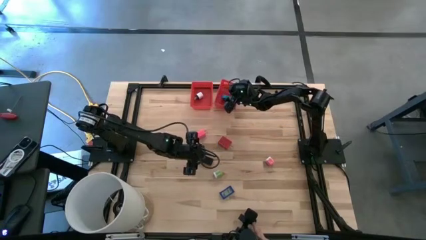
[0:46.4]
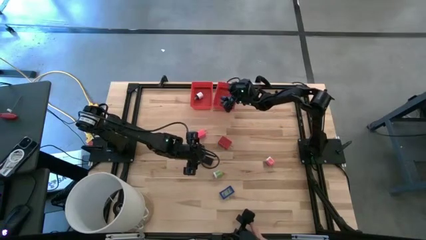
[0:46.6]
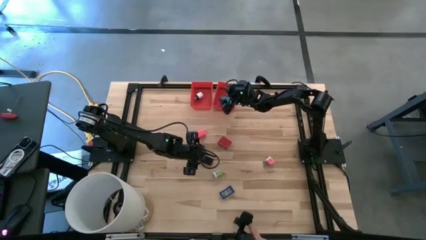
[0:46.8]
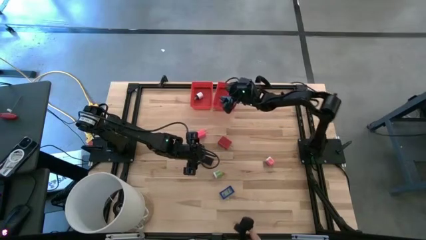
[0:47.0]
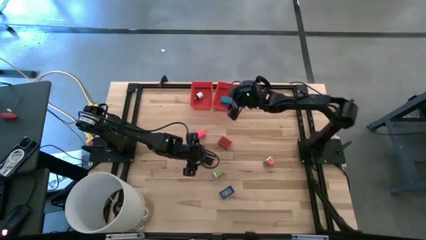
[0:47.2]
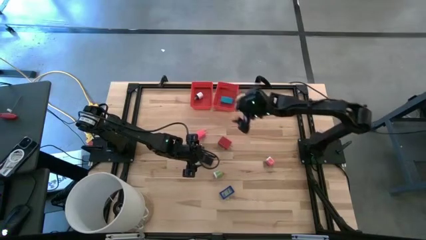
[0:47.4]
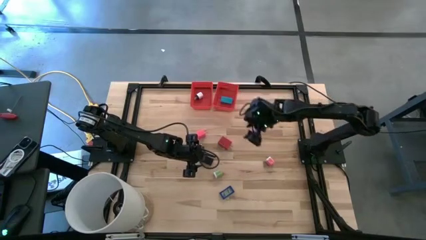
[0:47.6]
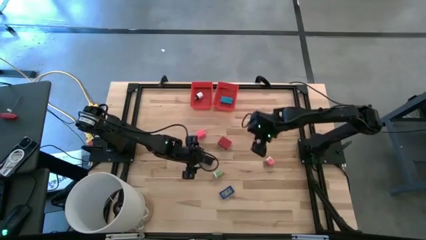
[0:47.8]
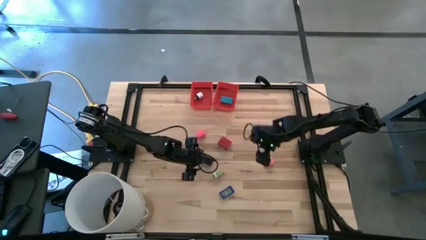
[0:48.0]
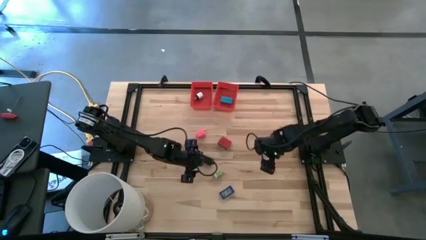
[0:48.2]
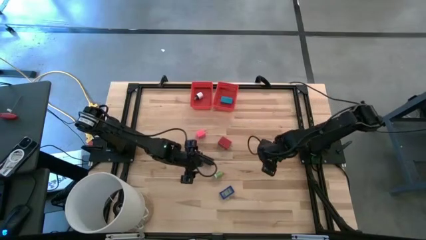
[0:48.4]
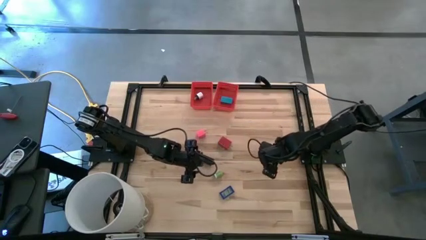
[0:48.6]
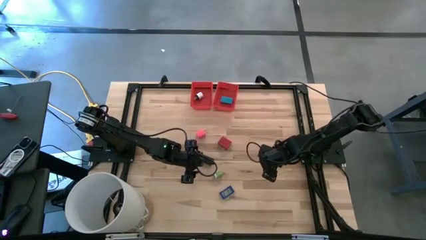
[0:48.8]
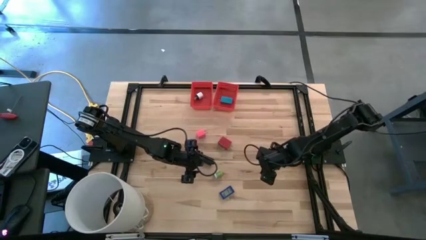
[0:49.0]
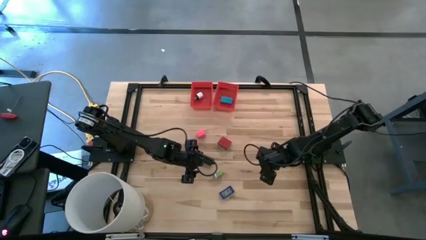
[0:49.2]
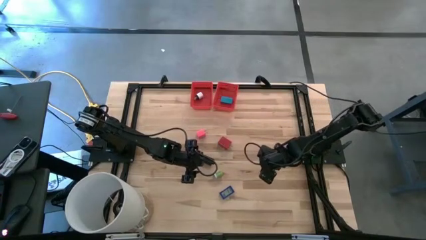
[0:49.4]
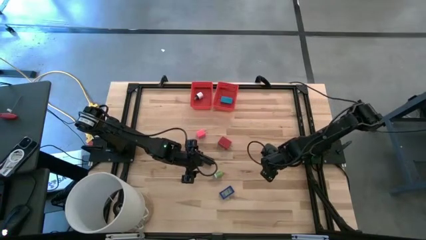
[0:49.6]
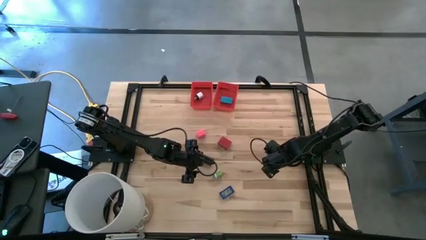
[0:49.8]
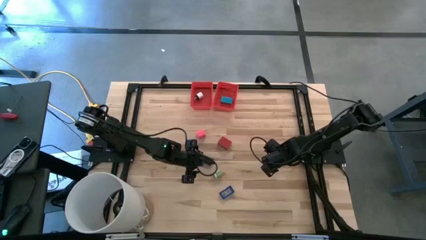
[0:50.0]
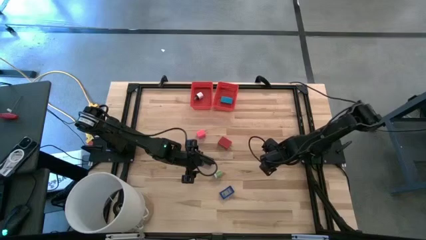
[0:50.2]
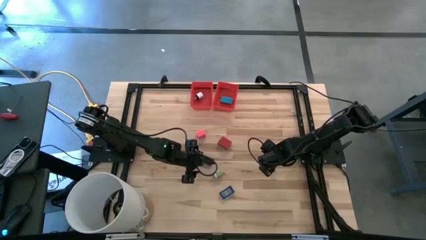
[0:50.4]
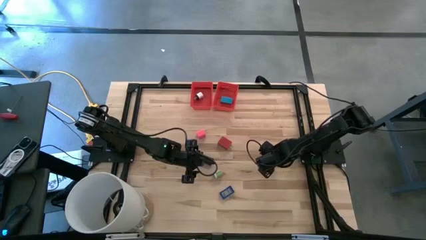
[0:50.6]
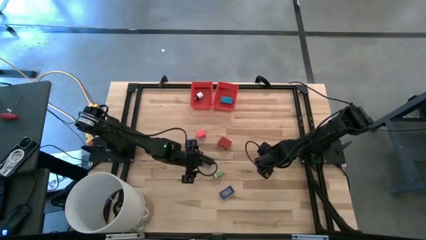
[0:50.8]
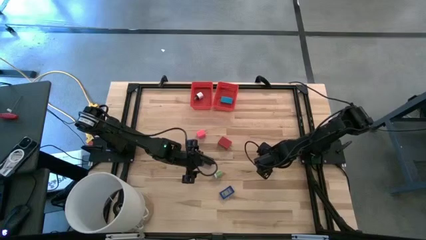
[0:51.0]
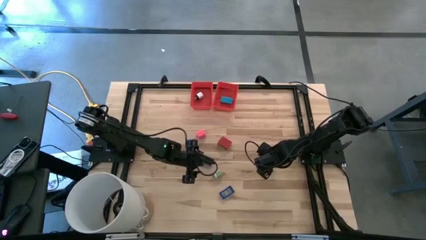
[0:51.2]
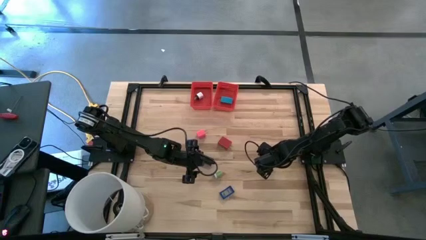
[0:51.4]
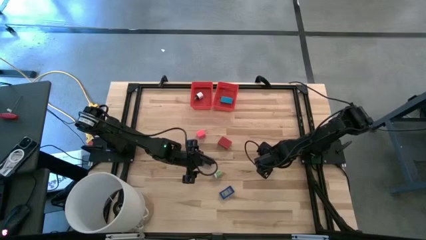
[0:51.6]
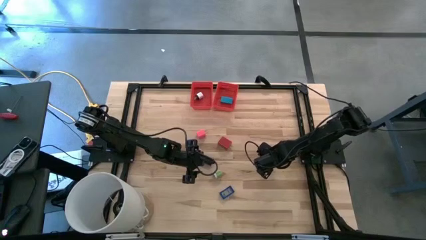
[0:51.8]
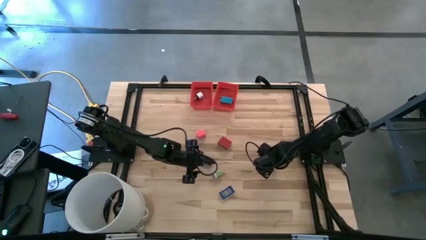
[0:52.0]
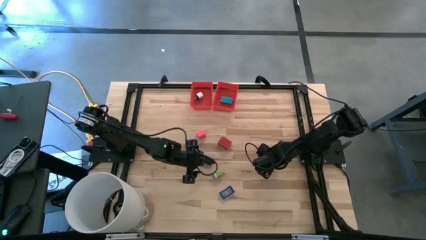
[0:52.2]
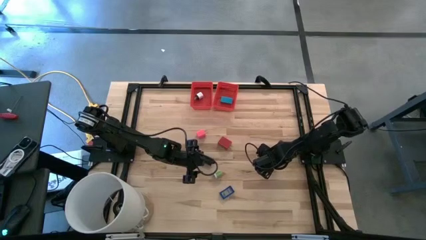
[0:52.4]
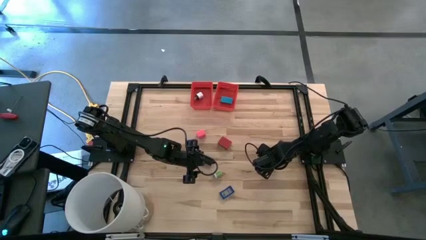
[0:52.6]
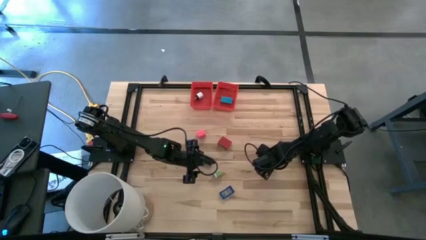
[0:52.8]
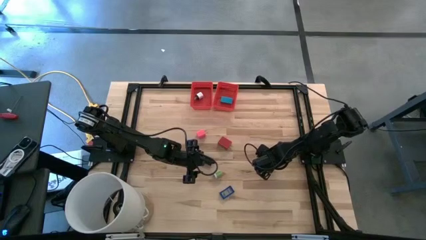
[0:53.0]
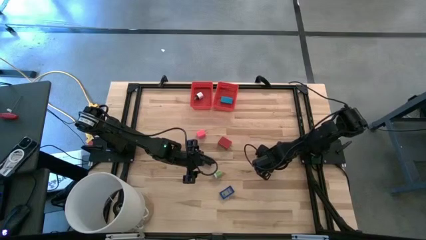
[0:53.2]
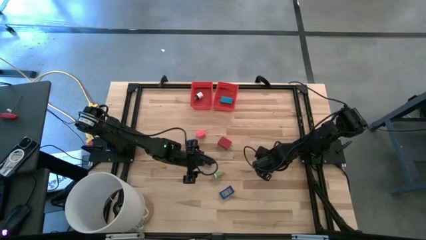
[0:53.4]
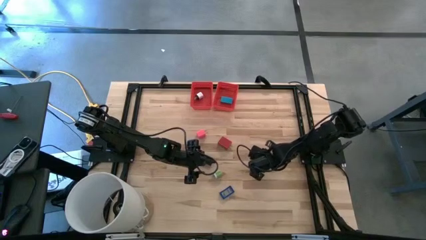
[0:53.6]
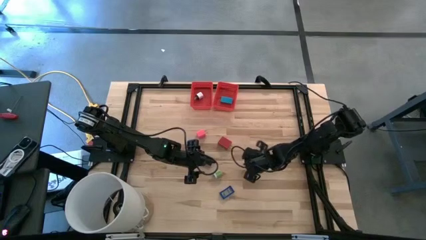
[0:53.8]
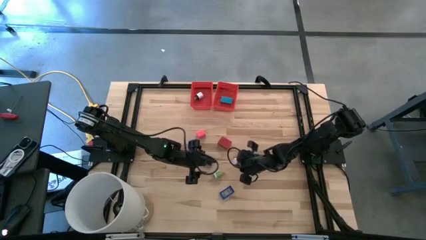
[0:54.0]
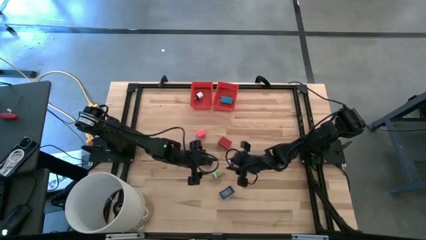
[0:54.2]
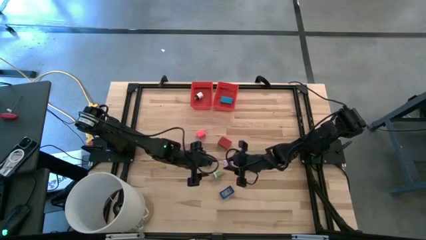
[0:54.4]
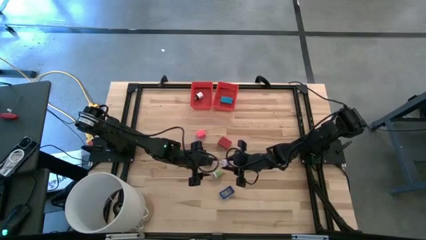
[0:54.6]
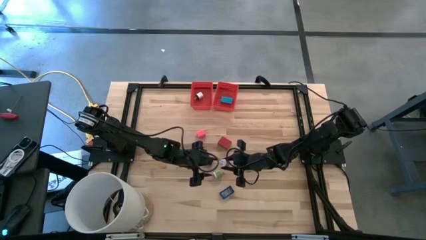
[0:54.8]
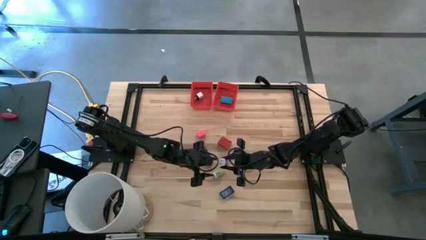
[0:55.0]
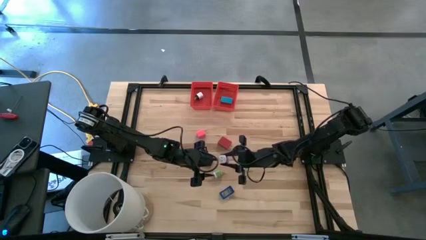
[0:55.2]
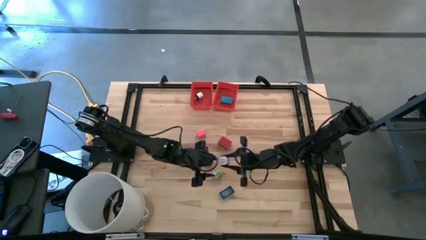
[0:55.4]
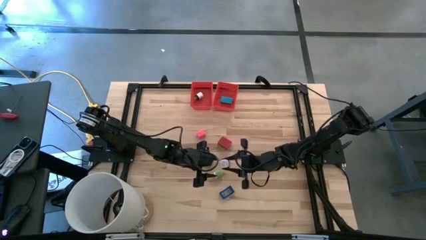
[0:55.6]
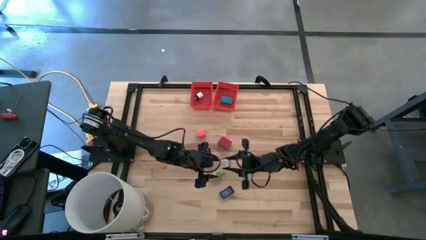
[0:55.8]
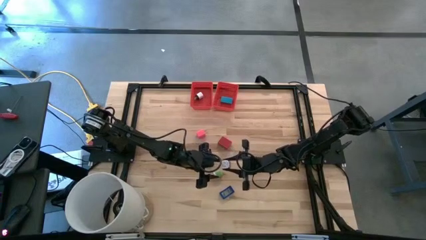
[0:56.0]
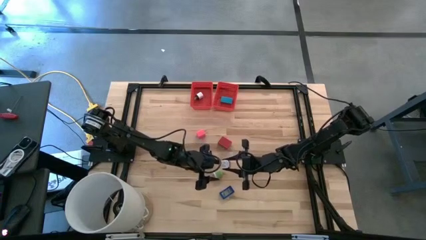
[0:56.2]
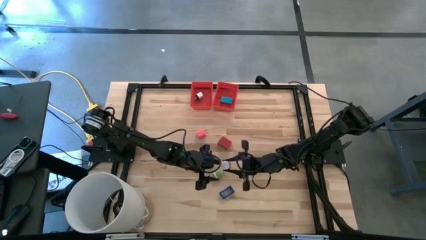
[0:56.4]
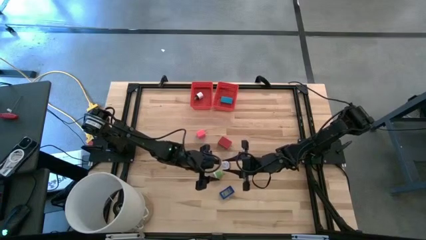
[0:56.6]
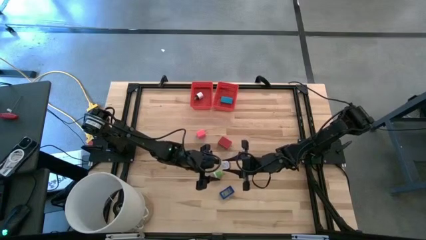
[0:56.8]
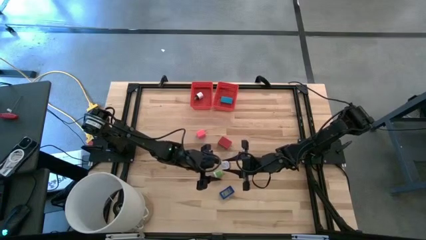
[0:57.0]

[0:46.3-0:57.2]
Task: Pick & Place Office items
Put the right pink charger adapter into the left red basket

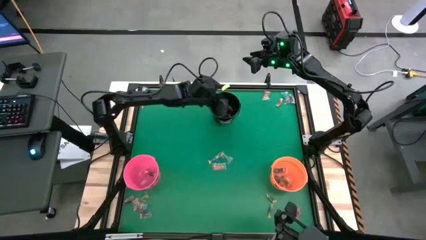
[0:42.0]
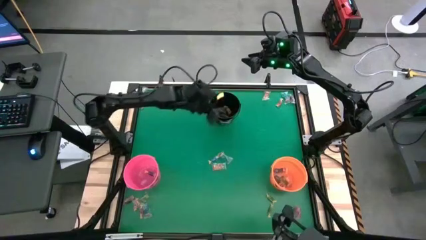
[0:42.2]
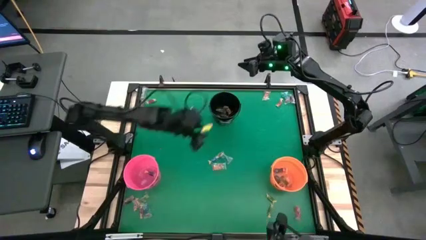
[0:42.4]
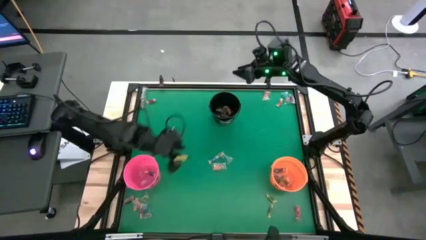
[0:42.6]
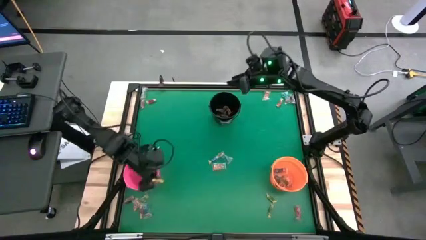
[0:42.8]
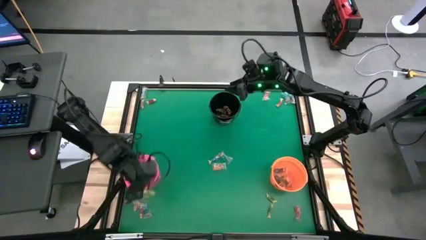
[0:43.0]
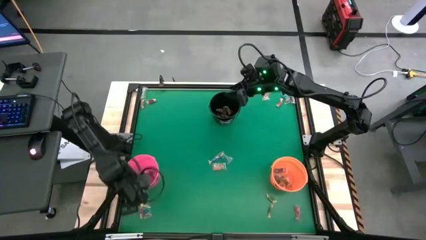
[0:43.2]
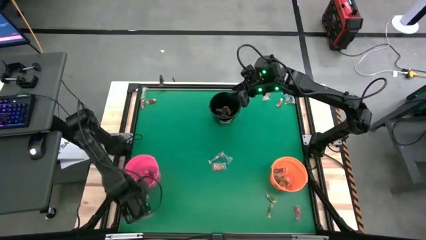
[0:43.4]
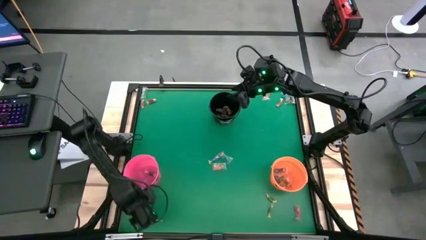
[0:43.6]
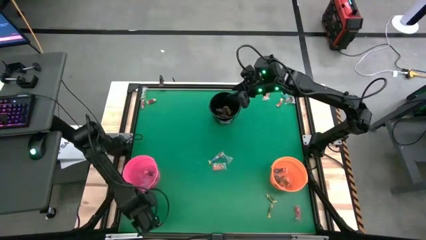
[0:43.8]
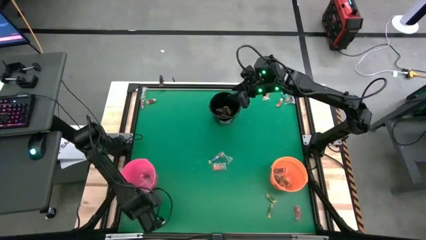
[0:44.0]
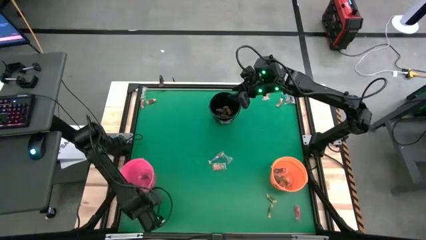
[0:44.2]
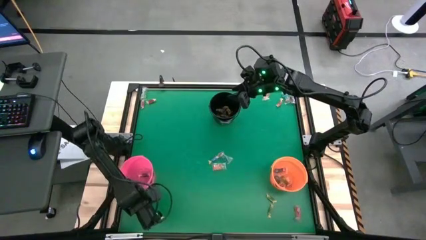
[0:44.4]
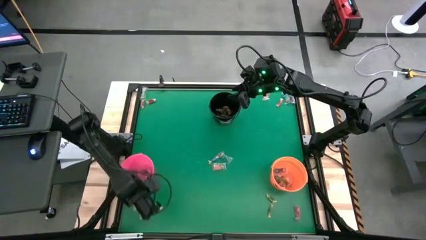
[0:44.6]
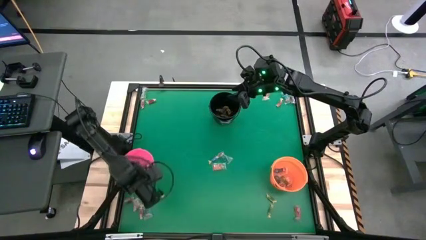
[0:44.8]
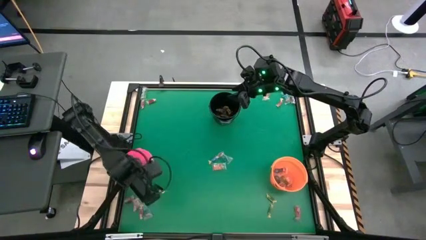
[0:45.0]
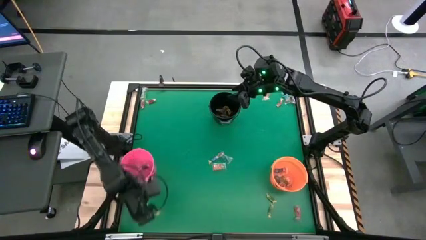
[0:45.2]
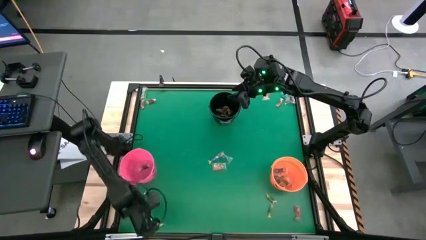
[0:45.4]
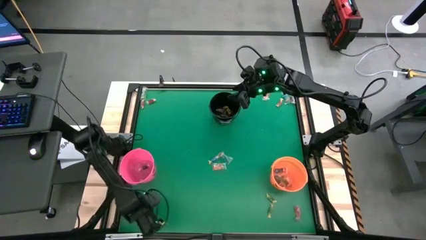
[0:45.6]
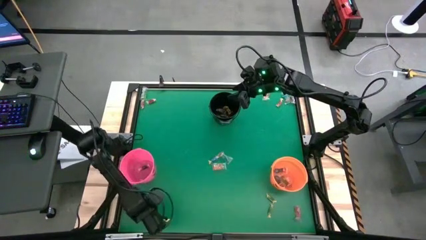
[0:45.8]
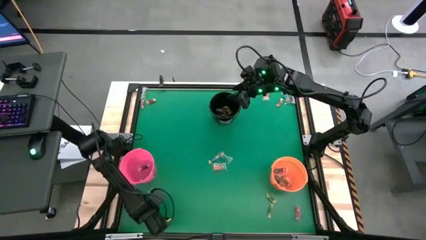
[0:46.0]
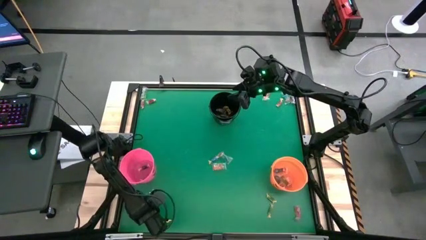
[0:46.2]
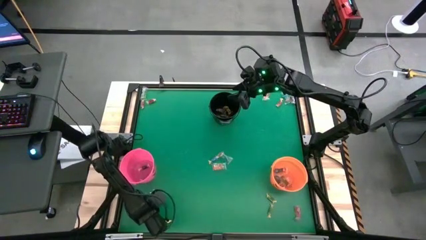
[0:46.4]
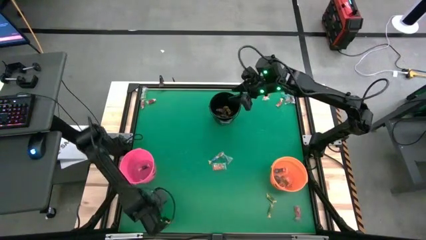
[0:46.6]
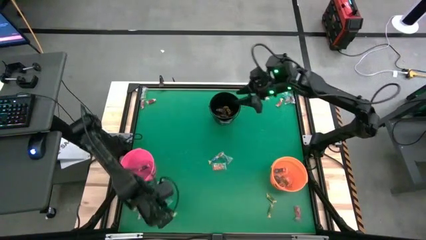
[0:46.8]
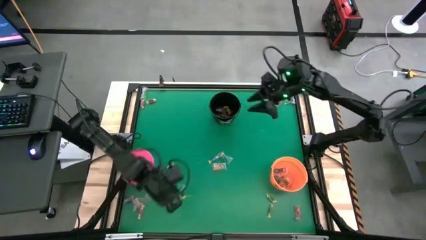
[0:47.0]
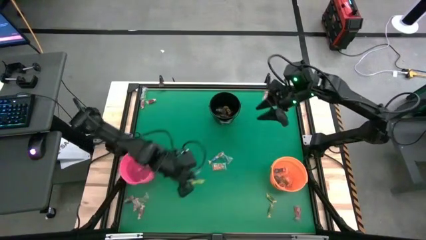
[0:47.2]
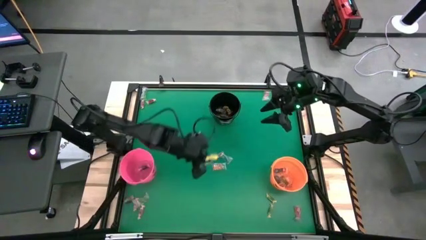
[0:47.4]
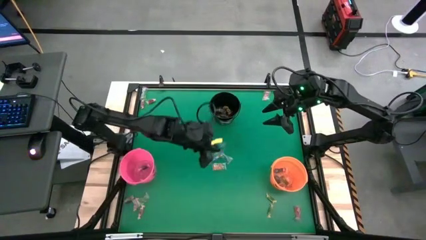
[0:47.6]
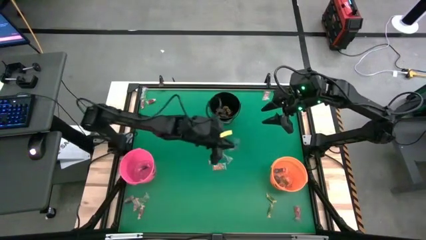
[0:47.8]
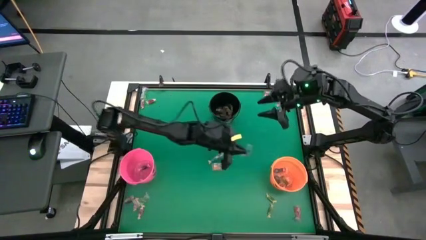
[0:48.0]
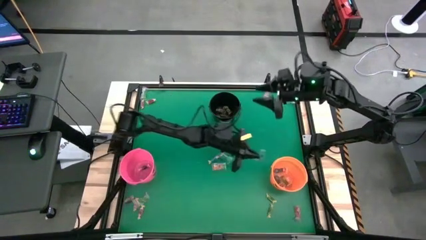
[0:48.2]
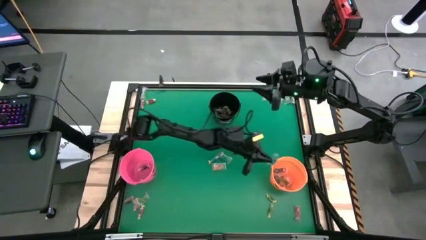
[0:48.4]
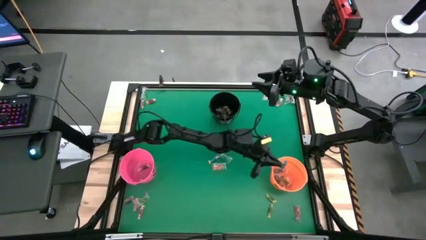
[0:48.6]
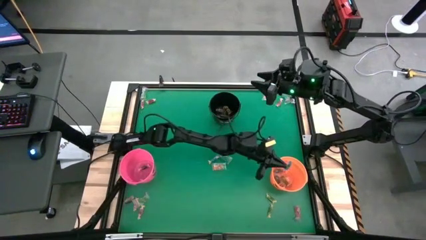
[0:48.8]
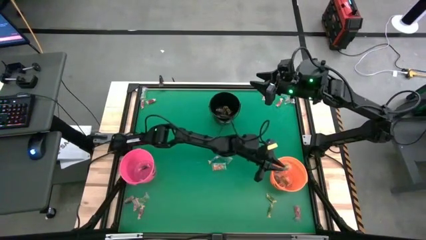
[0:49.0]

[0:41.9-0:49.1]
Task: Sort candy by brand, put in halloween buckets
Put the blue gummy into the orange bucket
